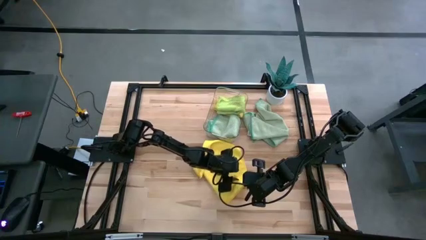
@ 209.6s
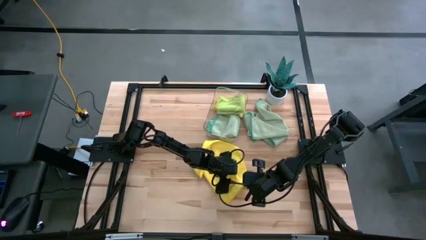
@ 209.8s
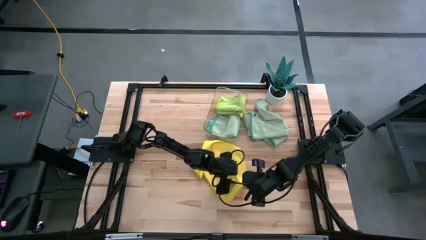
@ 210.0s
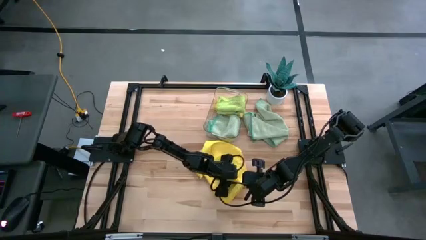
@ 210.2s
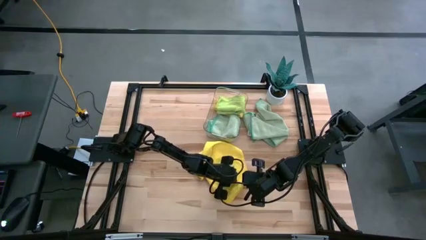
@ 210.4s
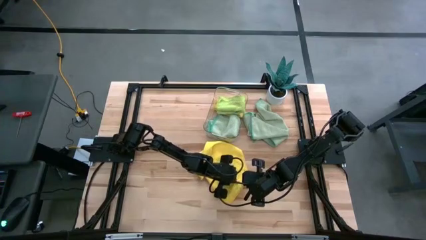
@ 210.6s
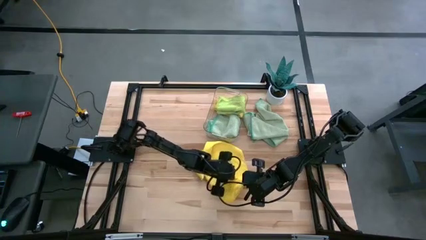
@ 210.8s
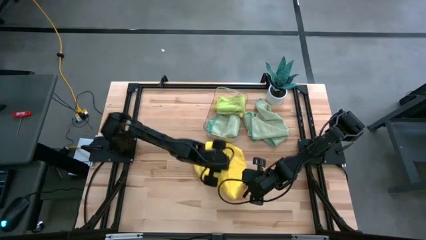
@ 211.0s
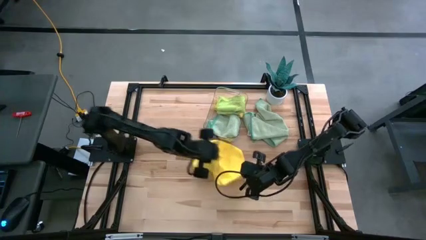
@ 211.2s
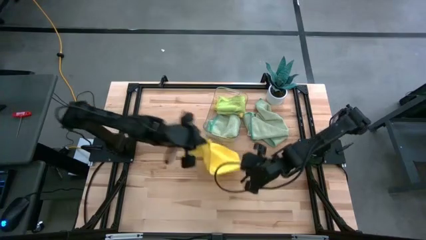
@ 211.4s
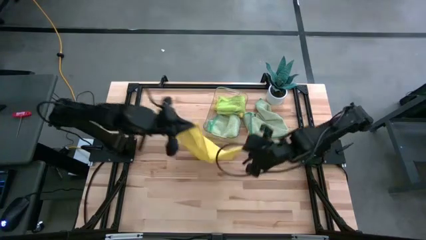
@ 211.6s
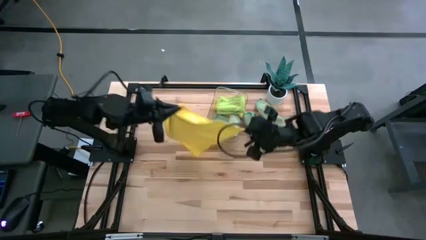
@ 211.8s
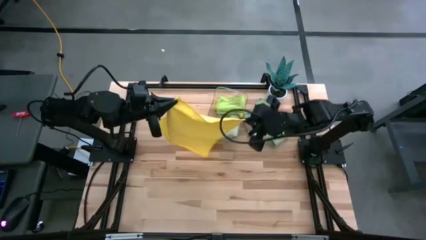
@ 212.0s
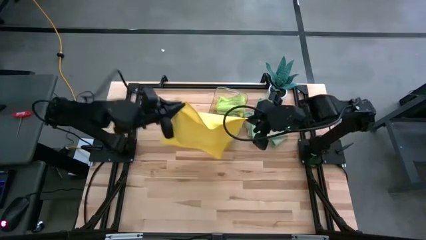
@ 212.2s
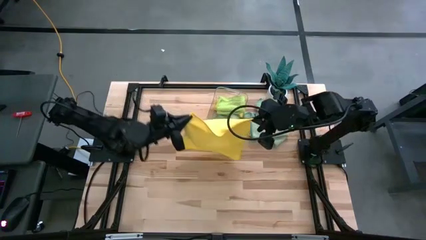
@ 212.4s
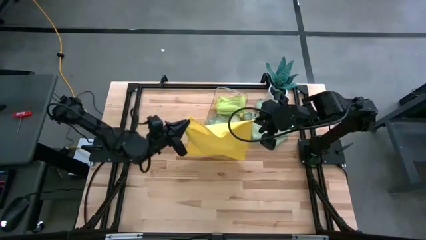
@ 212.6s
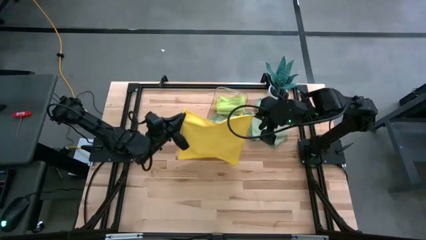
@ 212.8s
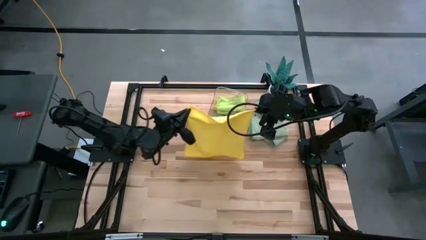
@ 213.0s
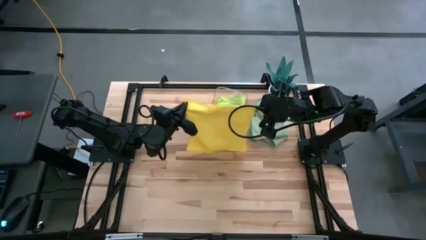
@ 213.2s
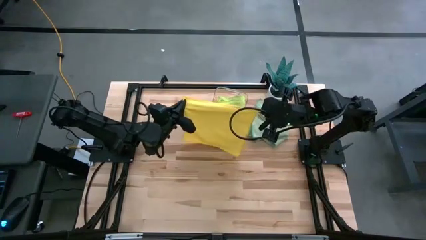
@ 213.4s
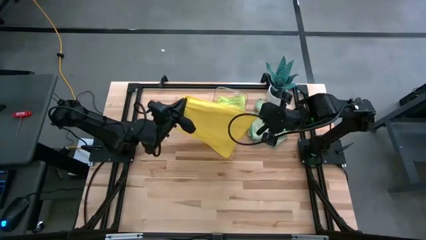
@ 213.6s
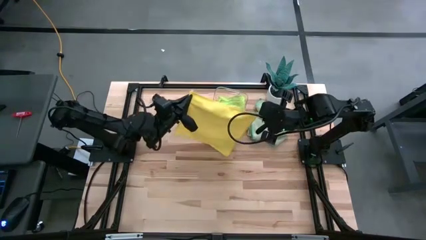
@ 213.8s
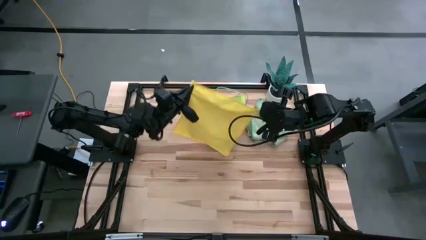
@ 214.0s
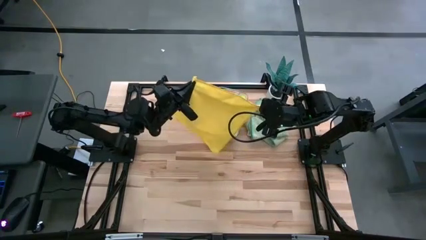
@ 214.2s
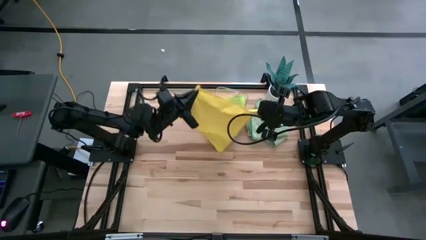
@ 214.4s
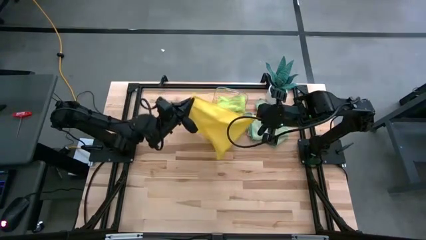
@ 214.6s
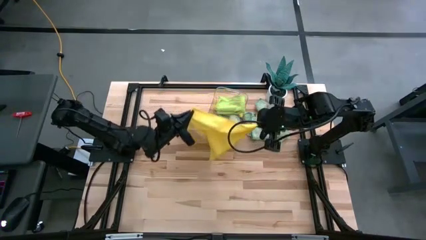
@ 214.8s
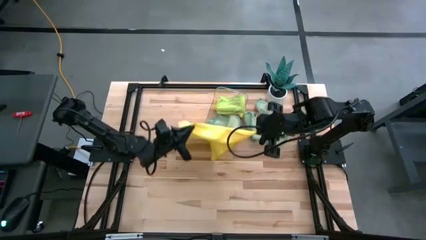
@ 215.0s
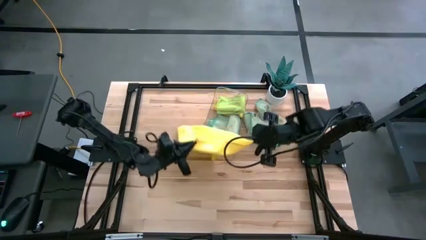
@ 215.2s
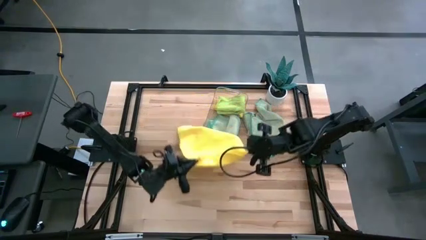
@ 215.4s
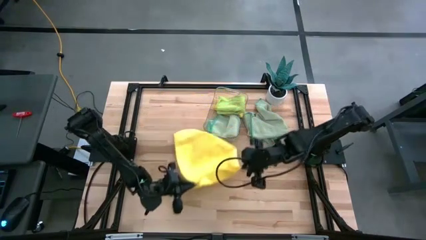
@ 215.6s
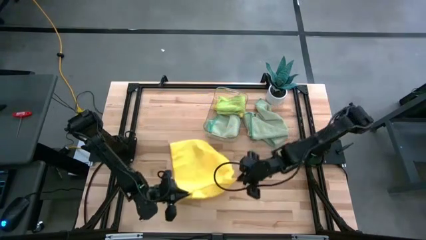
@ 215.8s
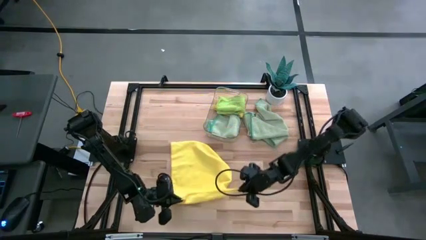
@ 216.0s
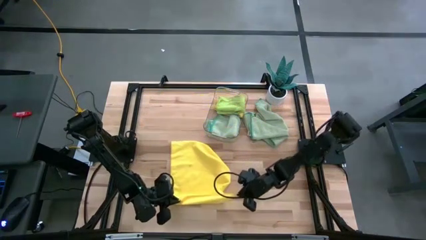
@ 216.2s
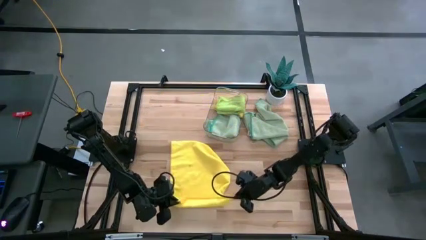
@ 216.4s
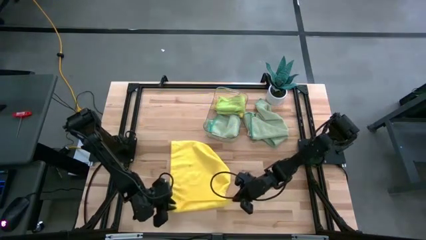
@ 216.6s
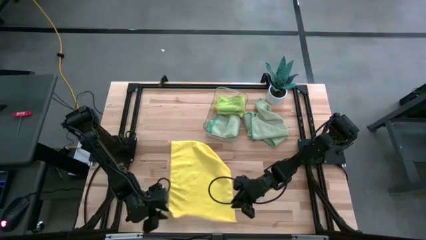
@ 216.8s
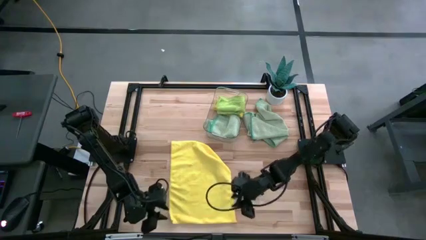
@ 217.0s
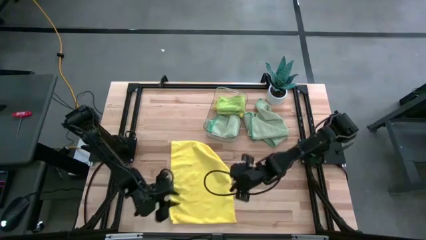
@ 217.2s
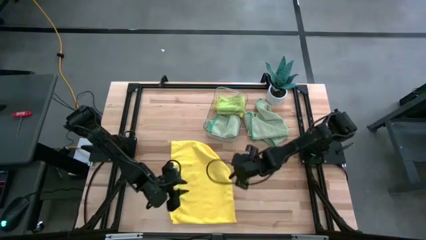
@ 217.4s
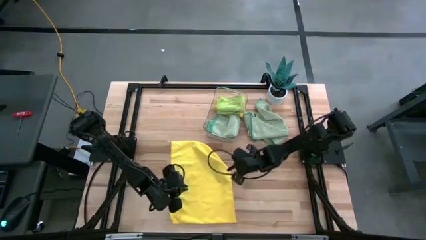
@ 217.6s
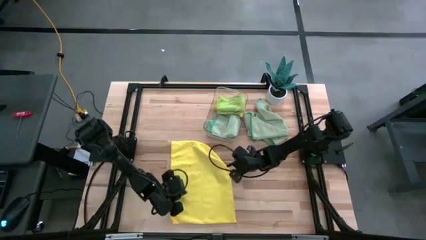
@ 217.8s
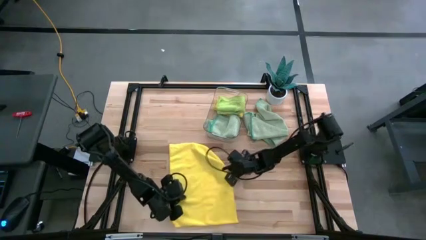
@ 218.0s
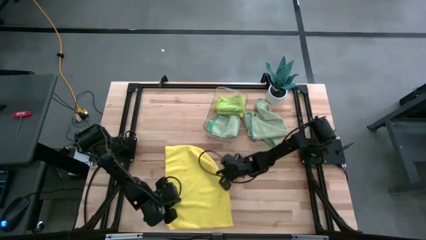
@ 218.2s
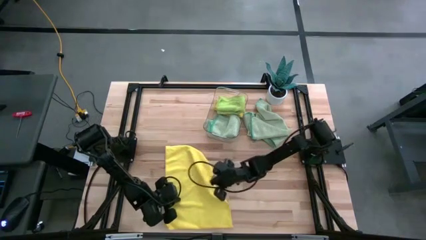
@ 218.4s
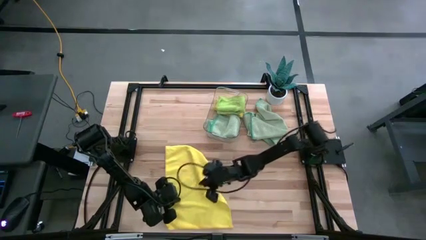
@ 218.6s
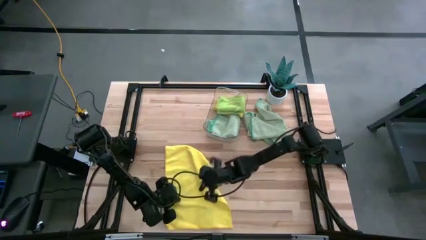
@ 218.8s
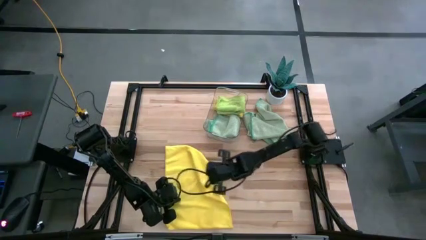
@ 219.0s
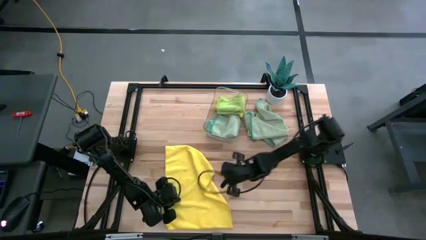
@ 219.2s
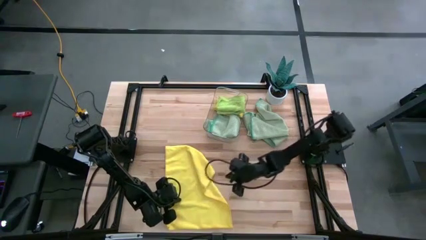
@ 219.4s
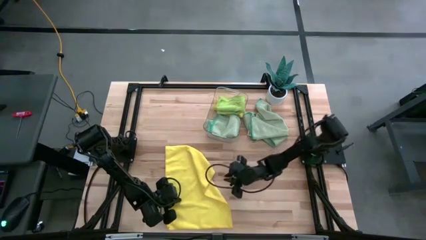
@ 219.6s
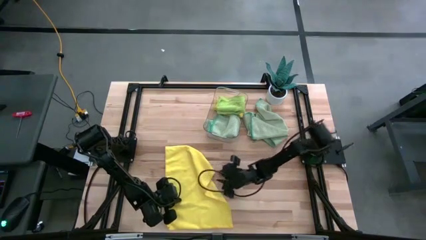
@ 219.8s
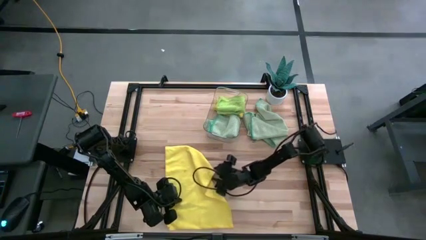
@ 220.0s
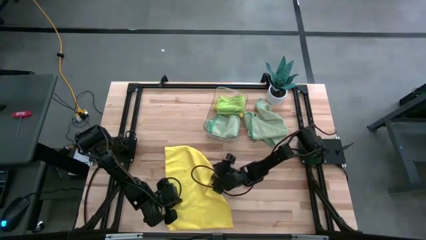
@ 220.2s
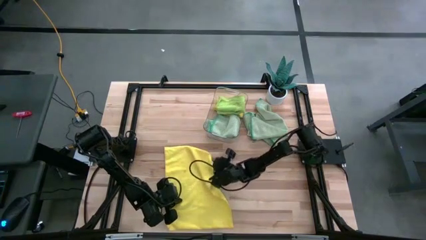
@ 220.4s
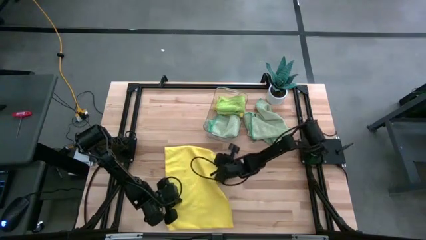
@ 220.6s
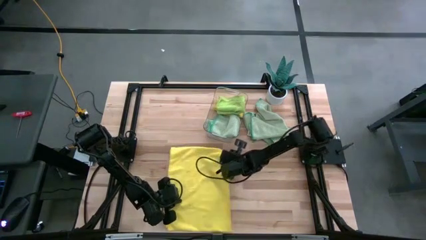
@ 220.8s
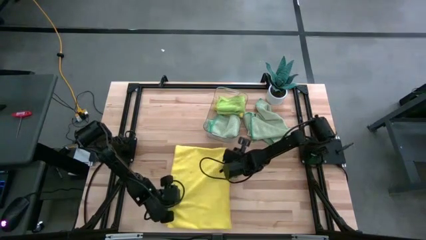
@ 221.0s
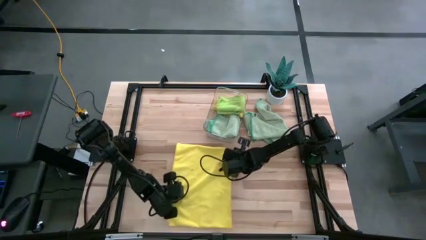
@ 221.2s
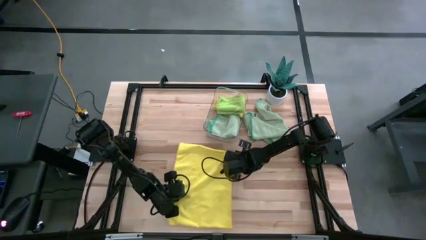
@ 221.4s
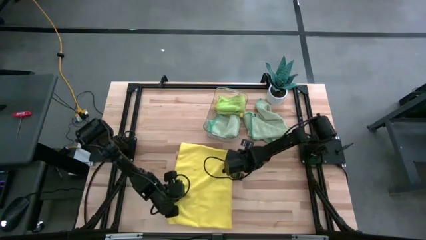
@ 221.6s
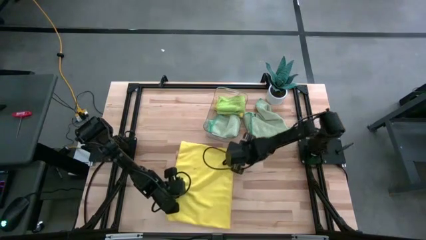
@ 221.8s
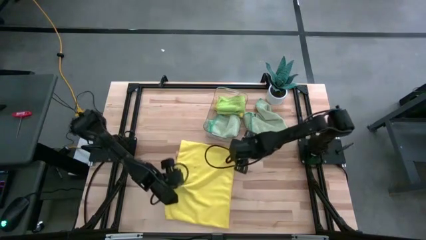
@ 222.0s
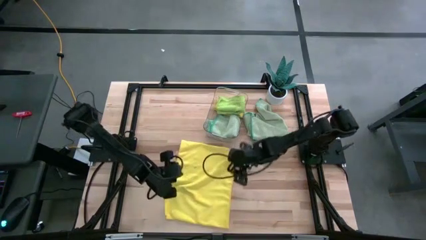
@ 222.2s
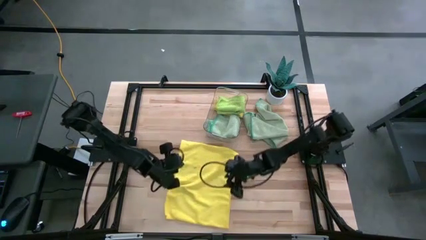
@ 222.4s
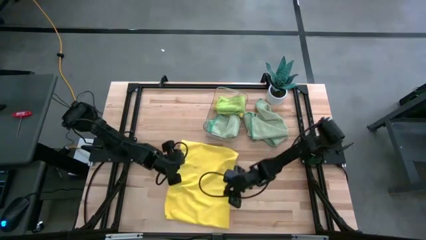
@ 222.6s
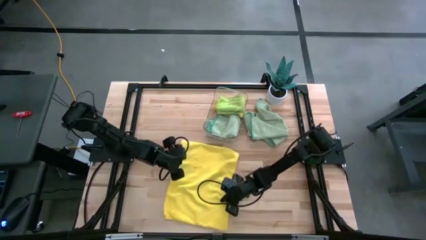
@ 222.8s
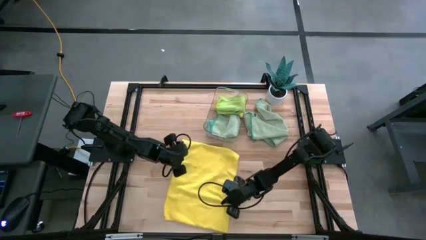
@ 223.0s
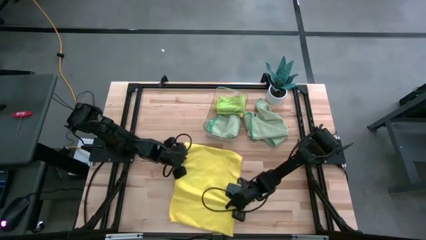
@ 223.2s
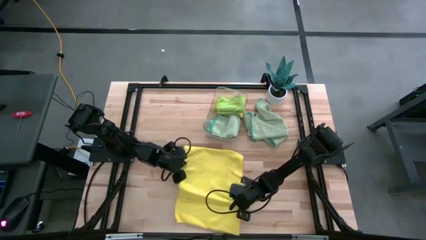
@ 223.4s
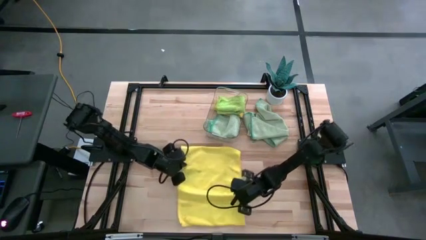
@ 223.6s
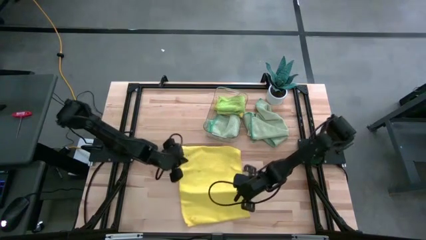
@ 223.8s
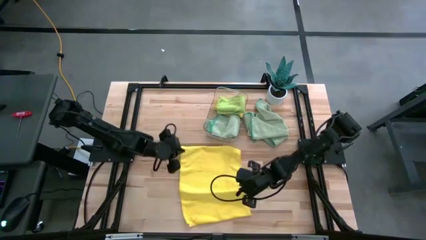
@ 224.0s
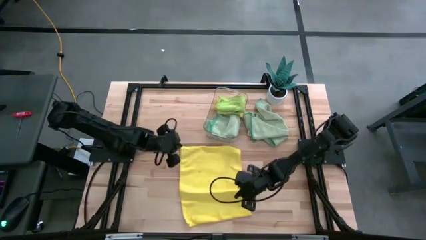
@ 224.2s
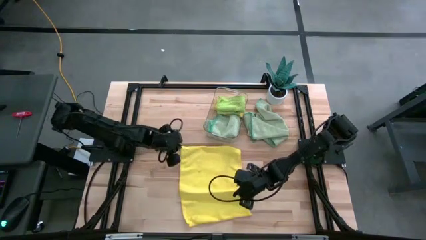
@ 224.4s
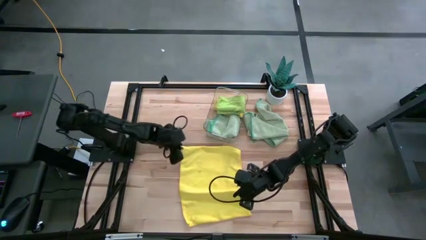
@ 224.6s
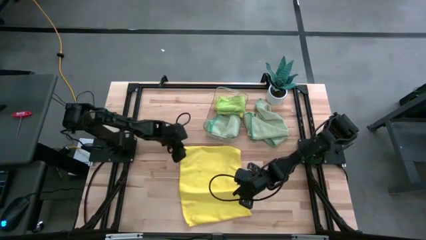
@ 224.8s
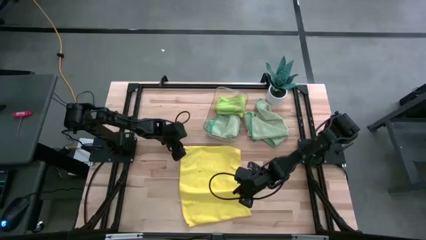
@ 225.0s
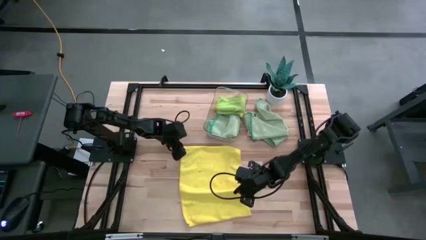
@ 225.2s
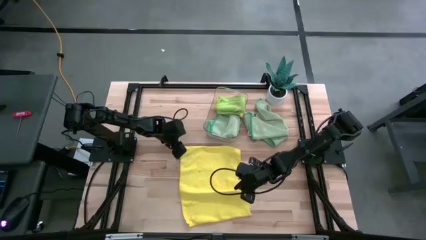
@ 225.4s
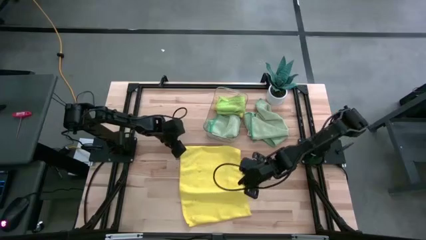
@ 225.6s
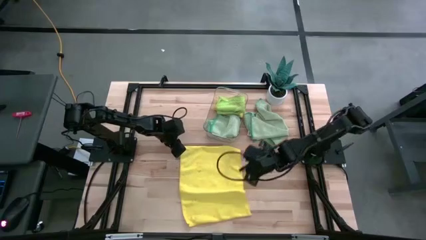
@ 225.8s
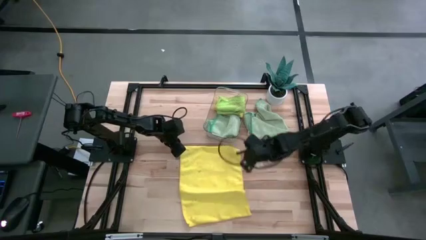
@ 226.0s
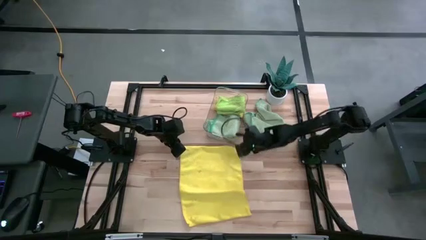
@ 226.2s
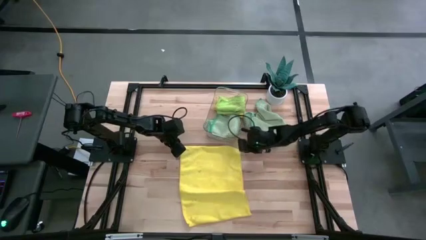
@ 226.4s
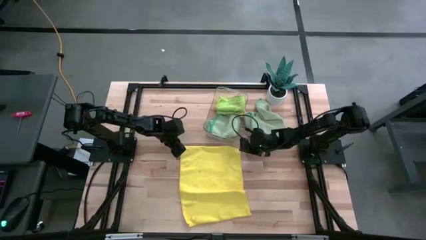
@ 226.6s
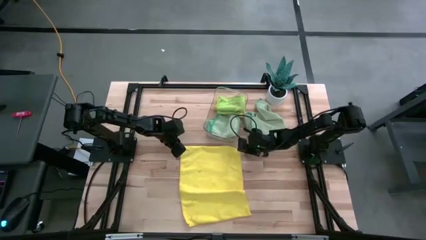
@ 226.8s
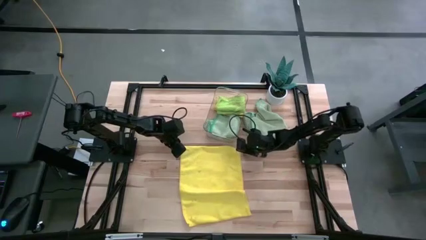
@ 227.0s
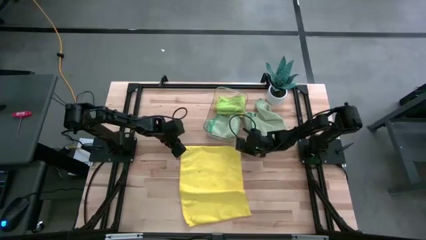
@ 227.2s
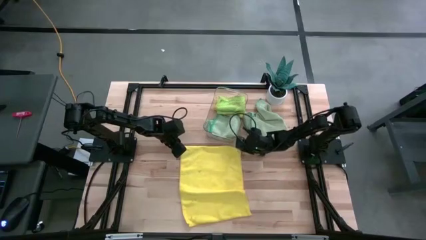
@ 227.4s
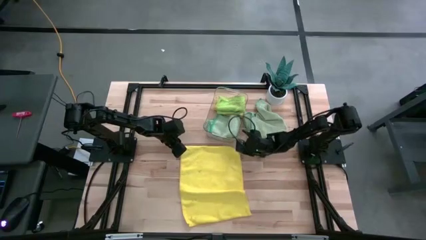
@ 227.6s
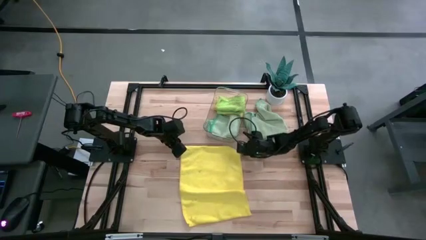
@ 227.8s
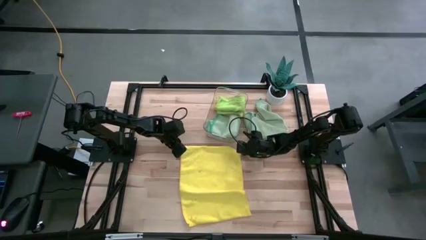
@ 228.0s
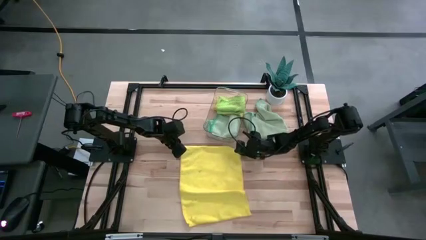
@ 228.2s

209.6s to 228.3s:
Task: Fold microfiber towels
Fold the yellow towel
